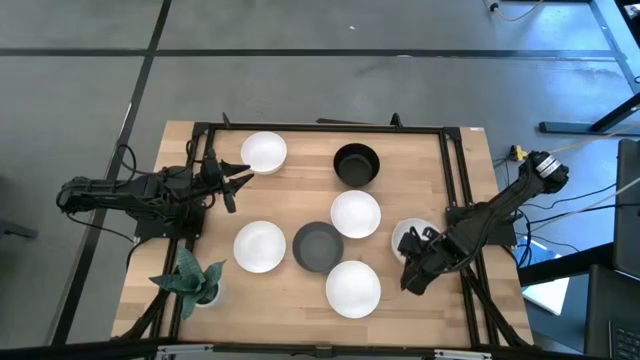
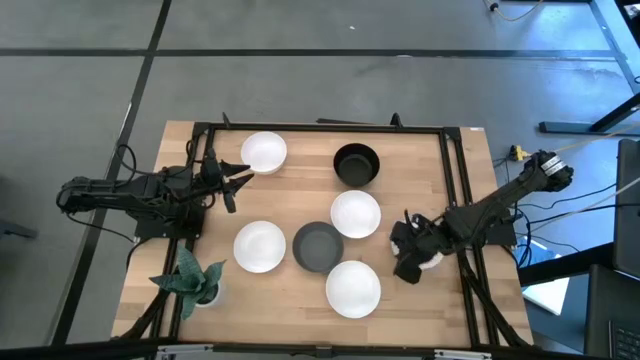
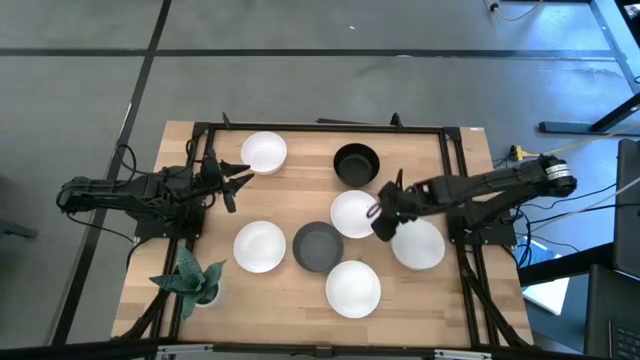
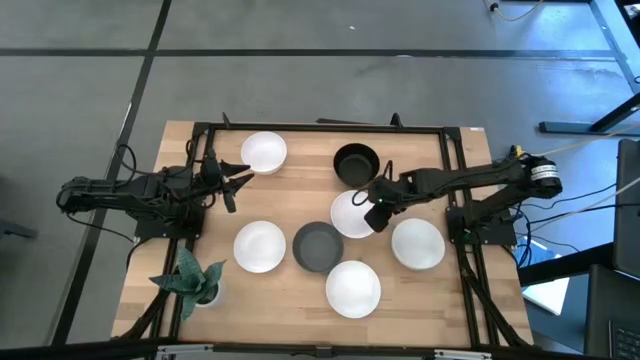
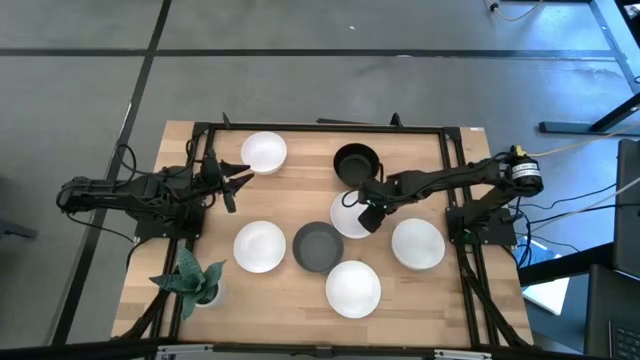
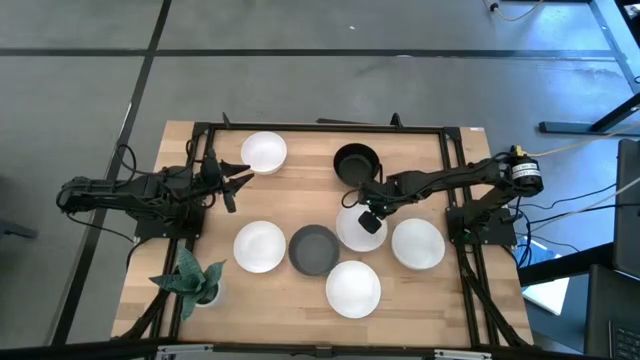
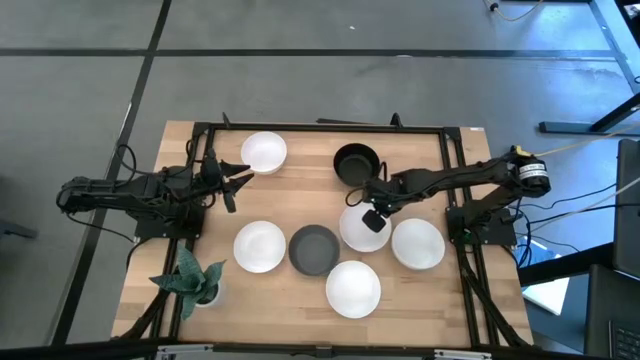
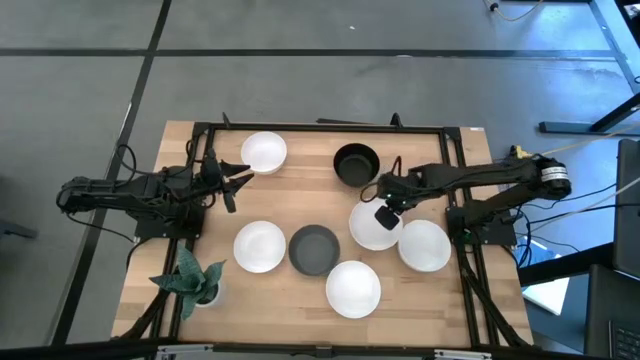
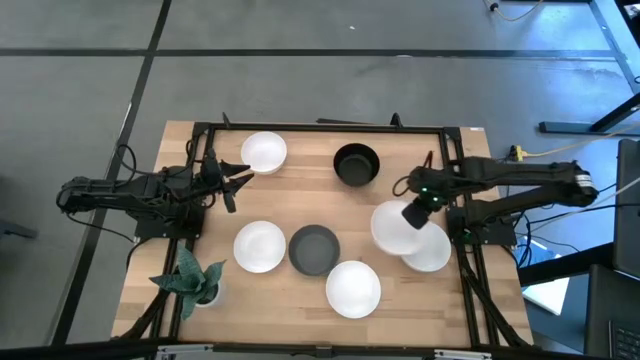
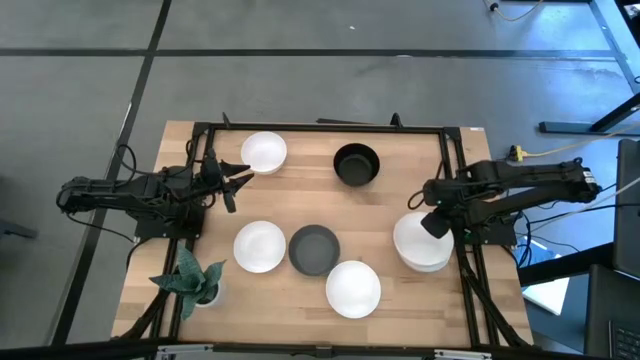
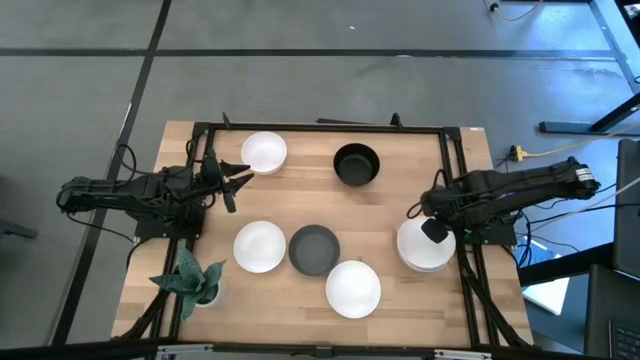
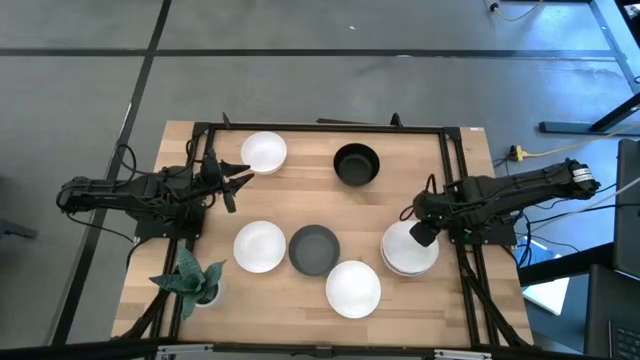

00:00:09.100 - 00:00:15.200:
Task: Nest bowls inside each other
Stack the white bowl on the white bowl

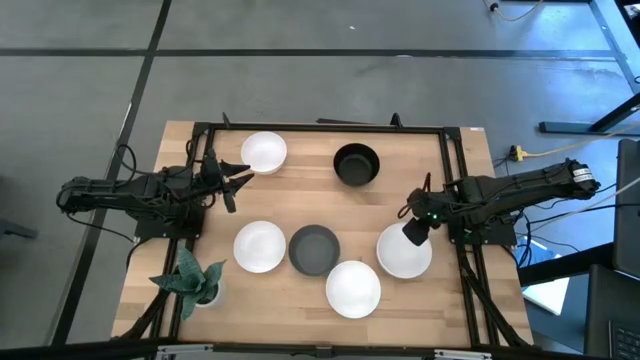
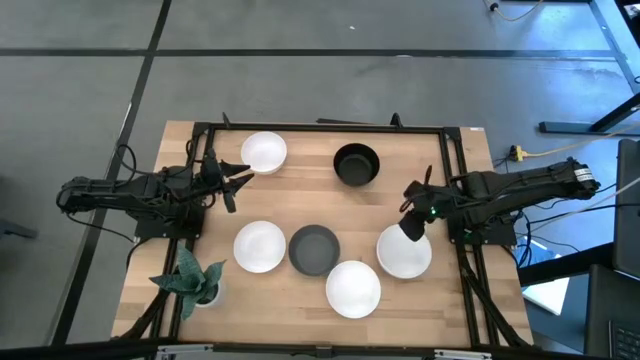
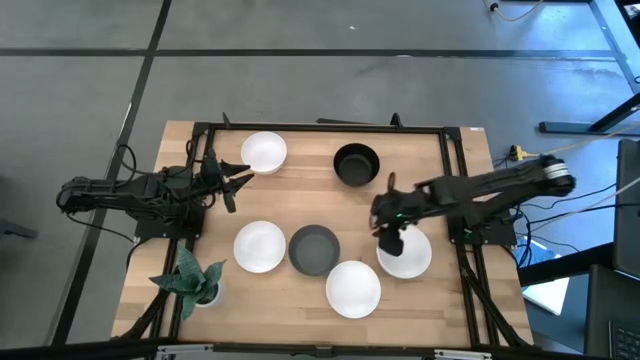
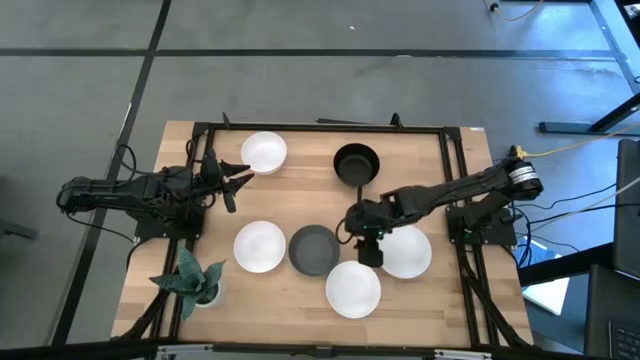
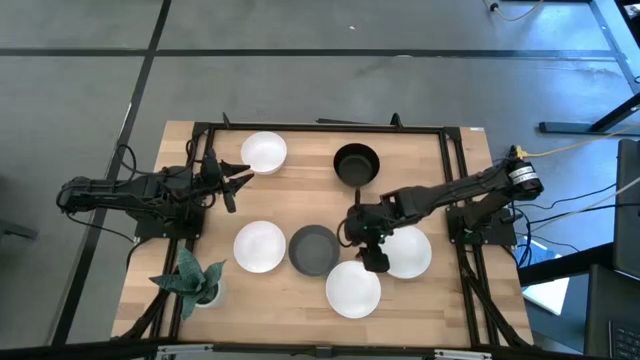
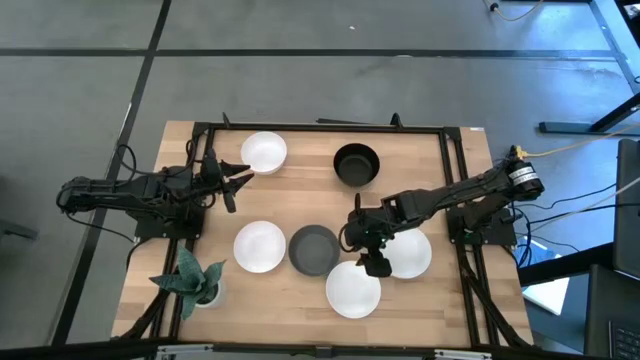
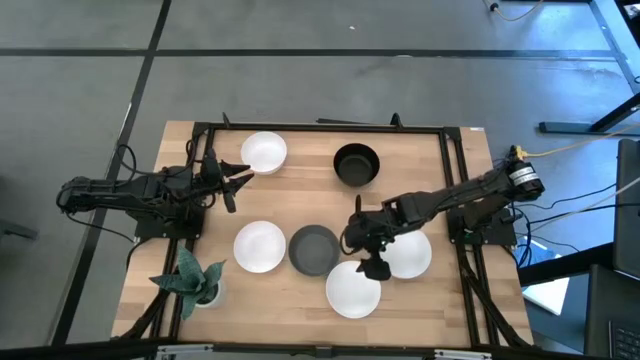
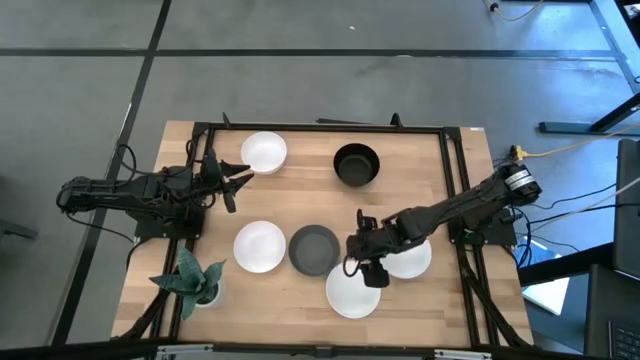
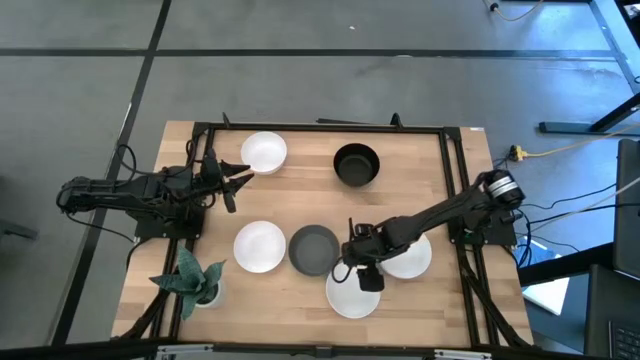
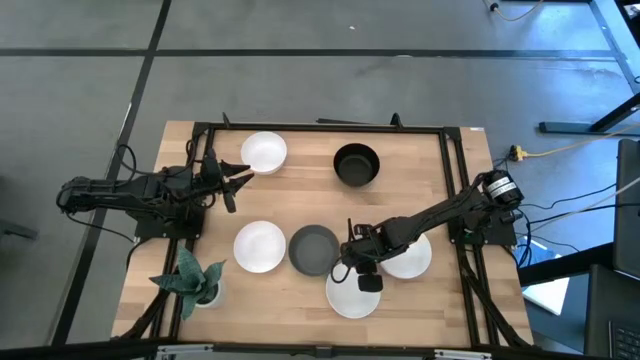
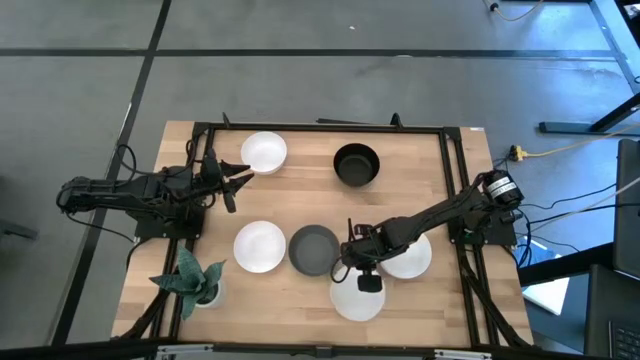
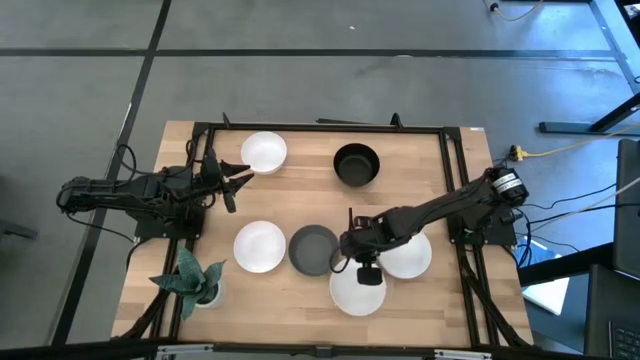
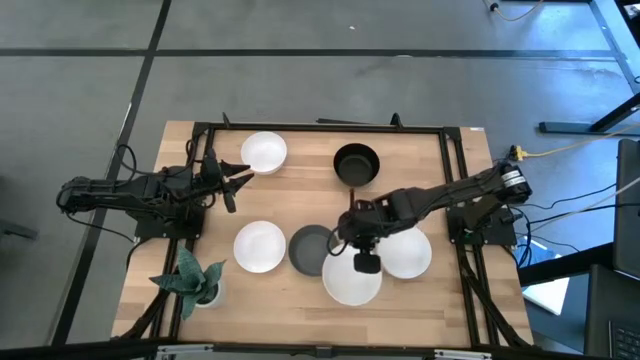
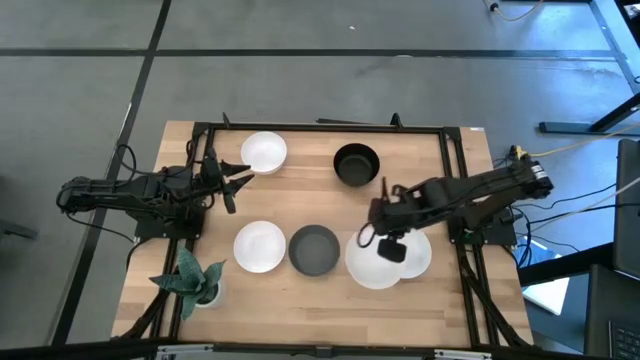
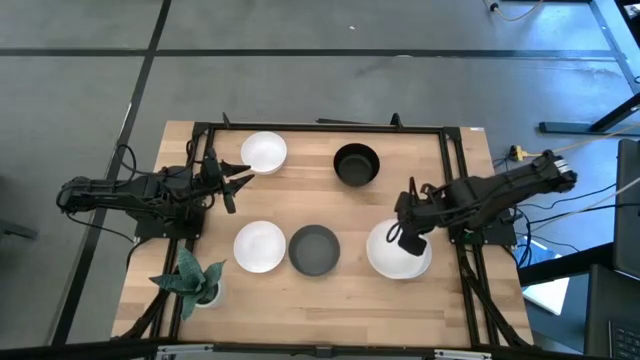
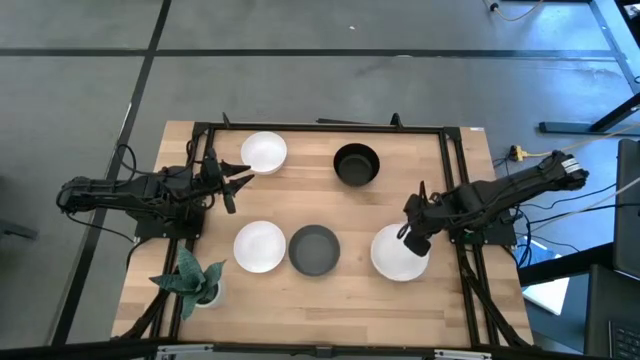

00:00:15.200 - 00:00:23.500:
Stack the white bowl on the white bowl

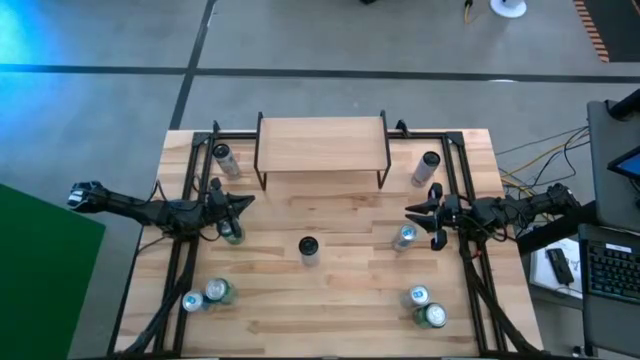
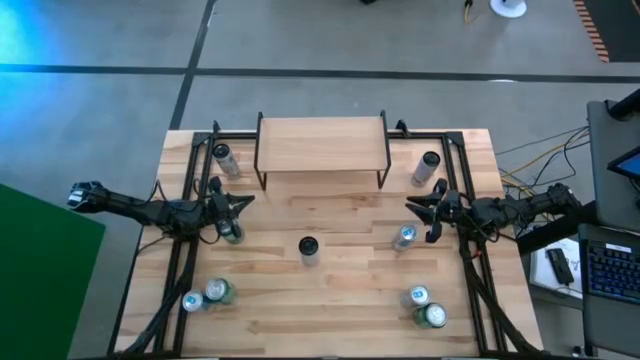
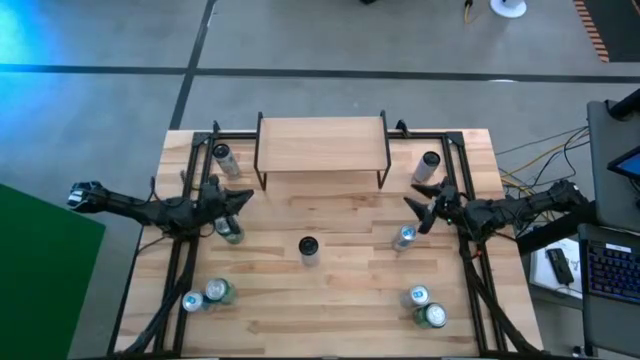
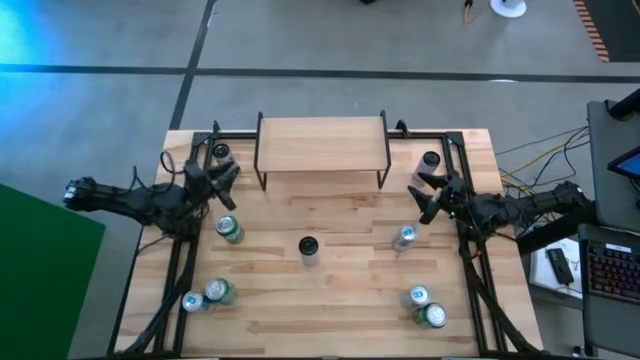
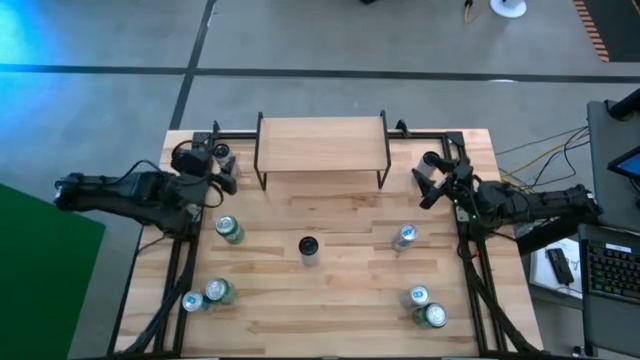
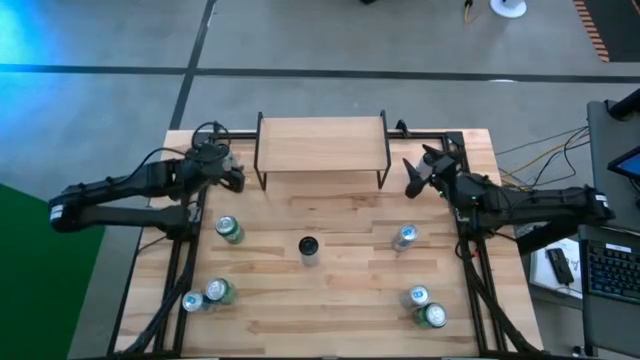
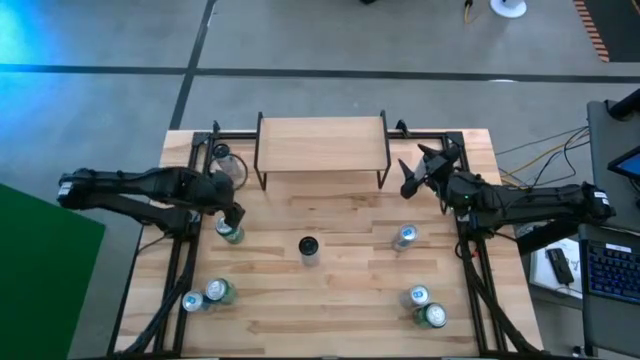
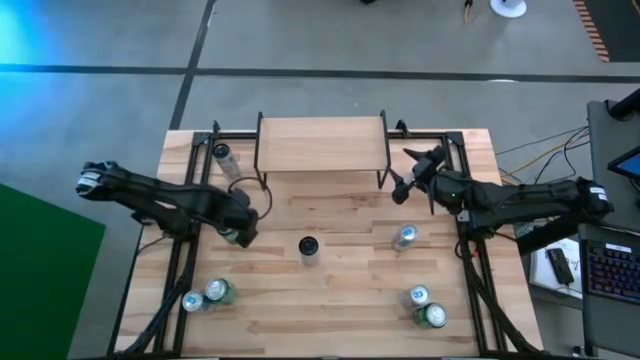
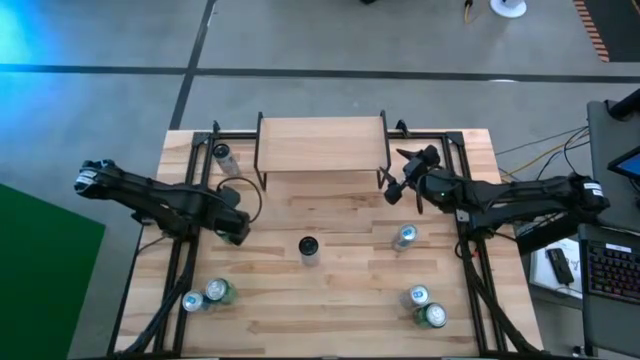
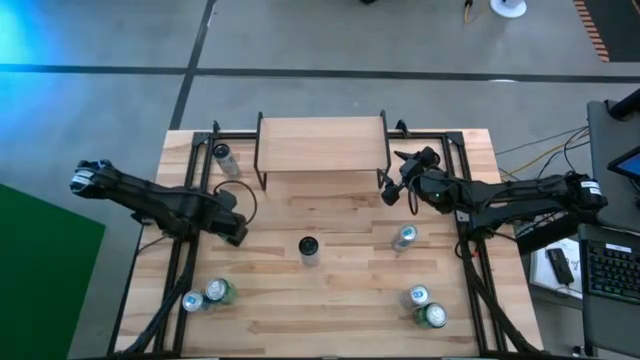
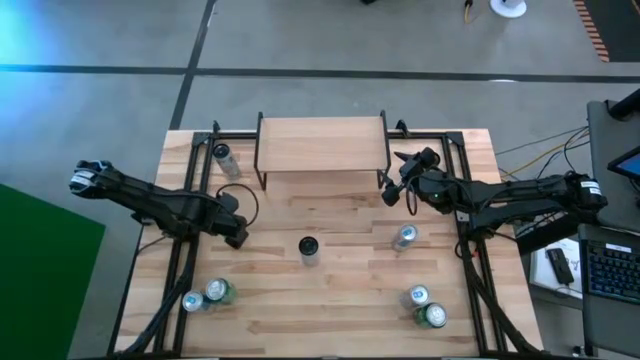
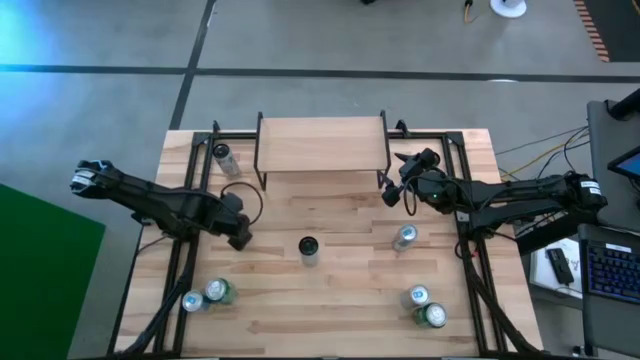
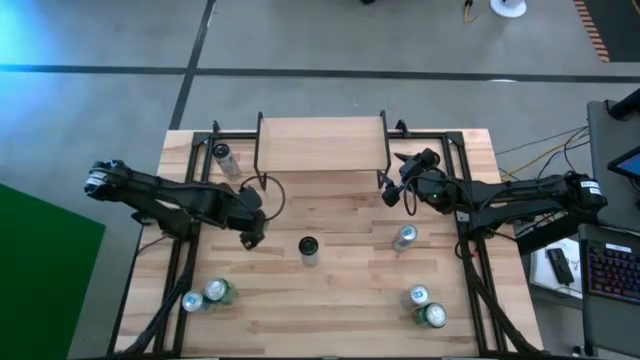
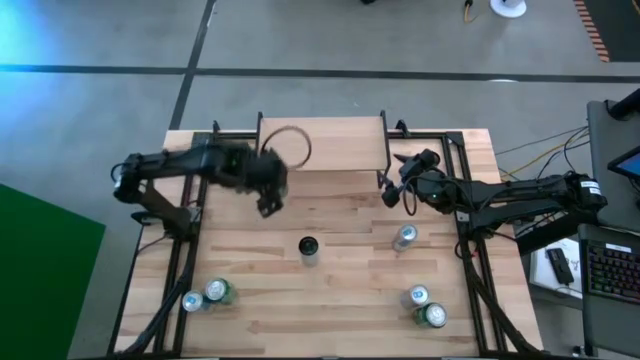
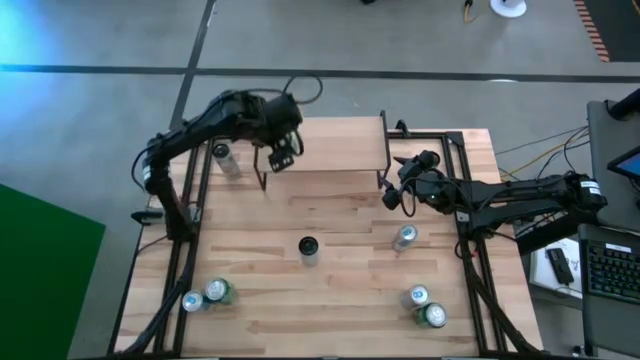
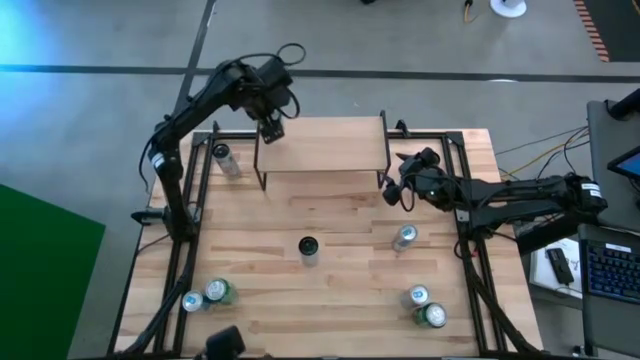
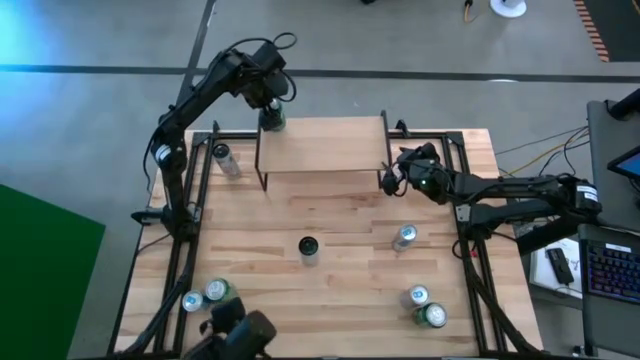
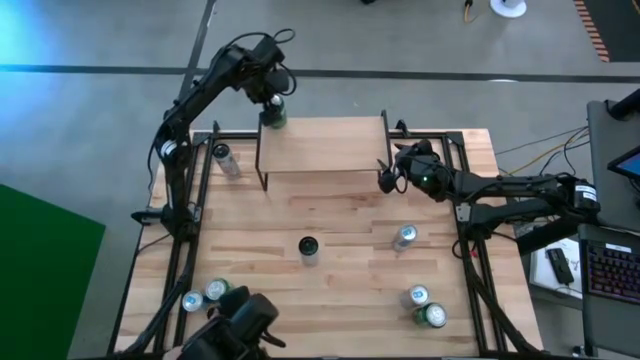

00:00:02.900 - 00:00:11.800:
Task: Place canned beverage on shelf
Put the top left green soda can on the shelf
